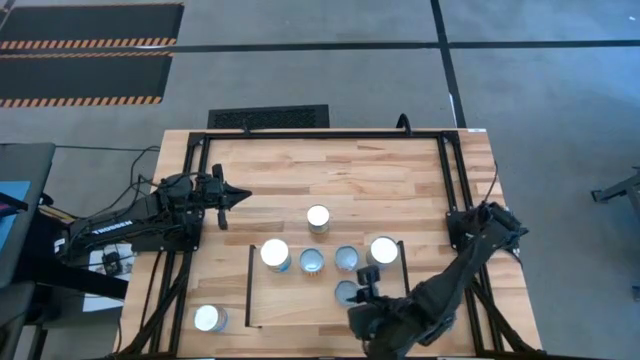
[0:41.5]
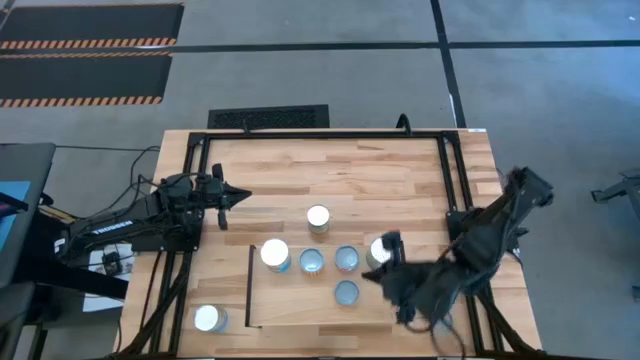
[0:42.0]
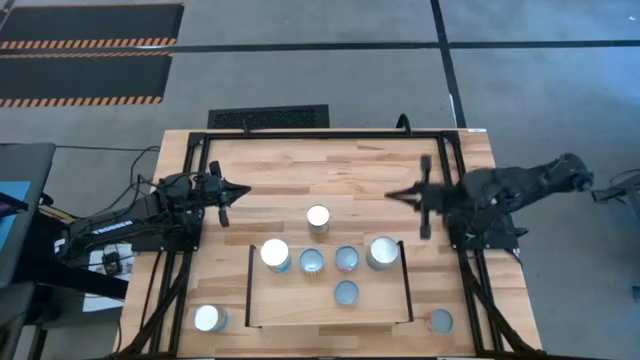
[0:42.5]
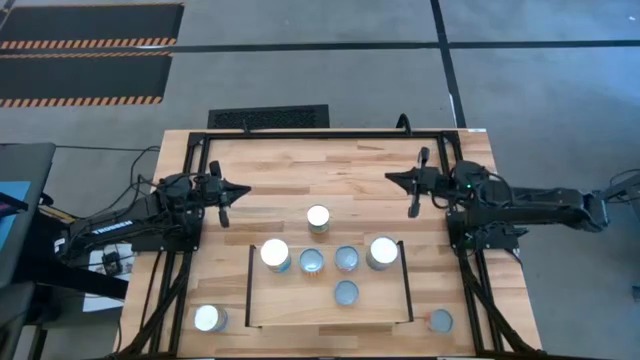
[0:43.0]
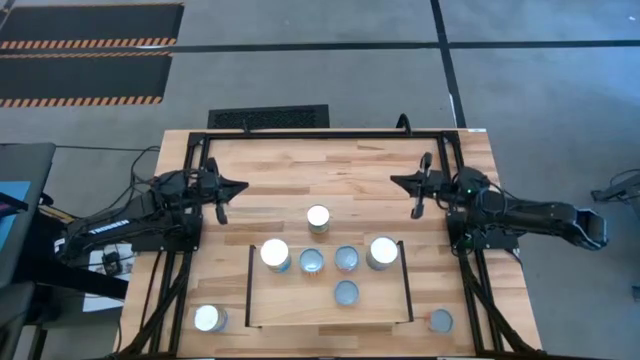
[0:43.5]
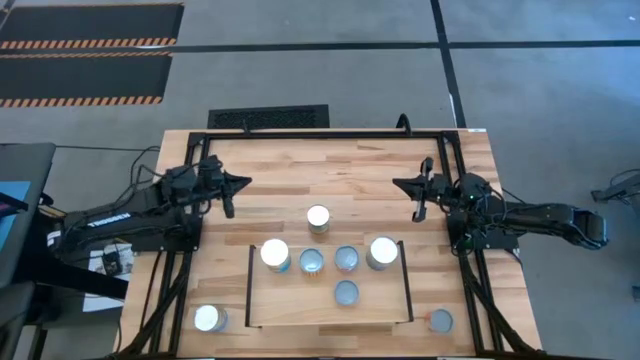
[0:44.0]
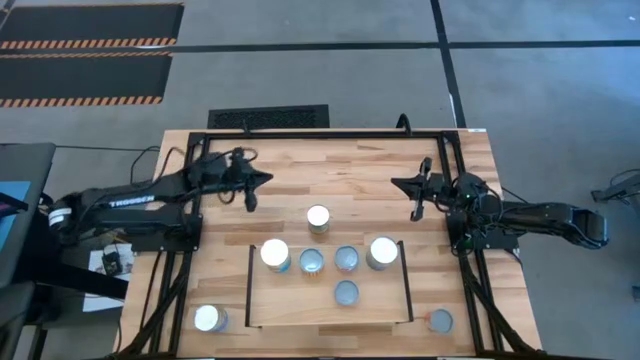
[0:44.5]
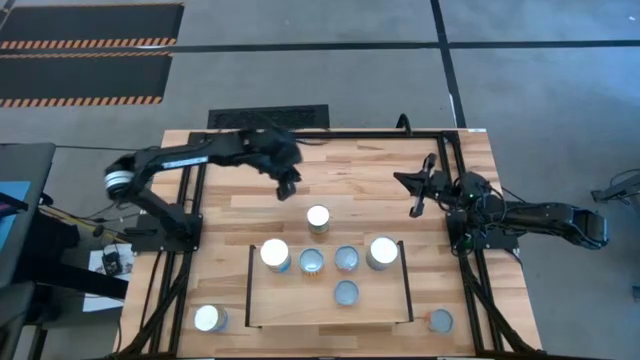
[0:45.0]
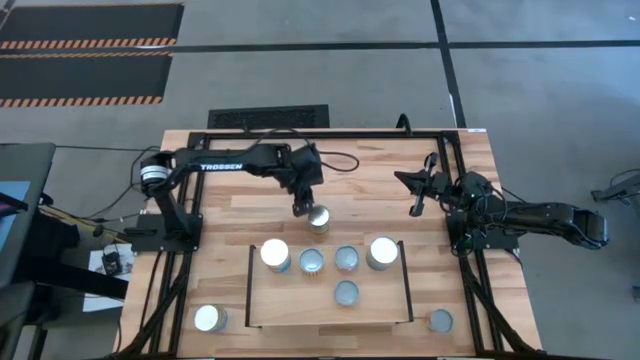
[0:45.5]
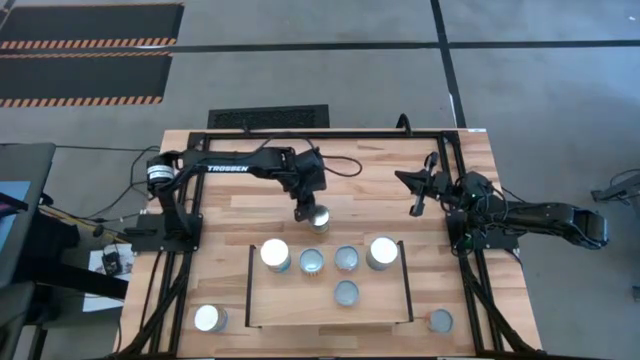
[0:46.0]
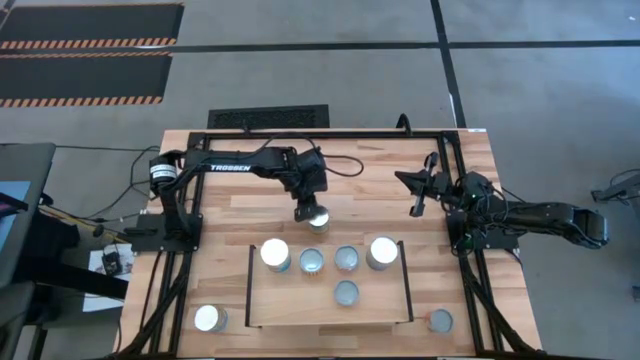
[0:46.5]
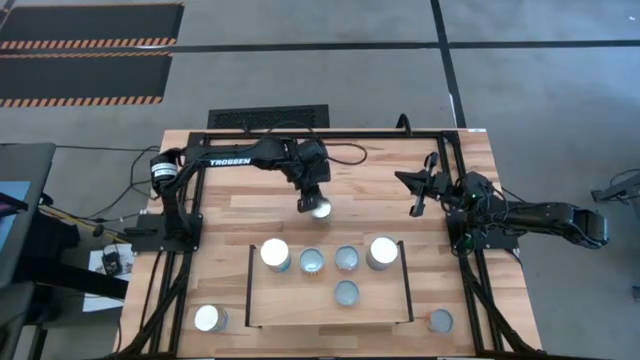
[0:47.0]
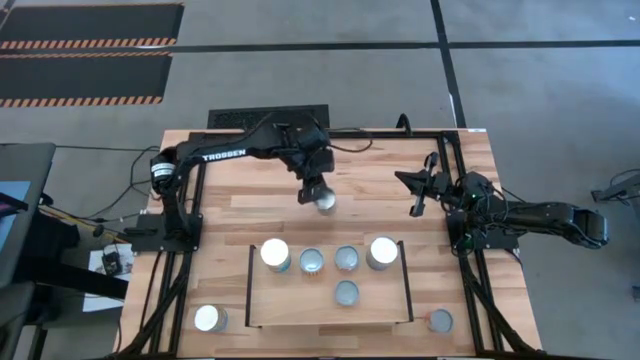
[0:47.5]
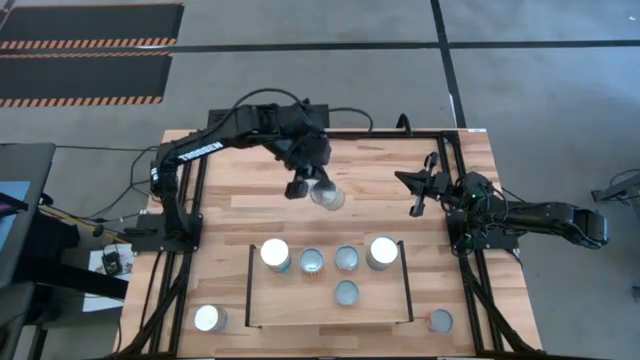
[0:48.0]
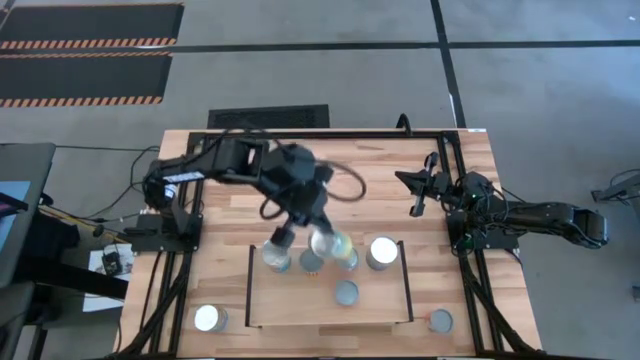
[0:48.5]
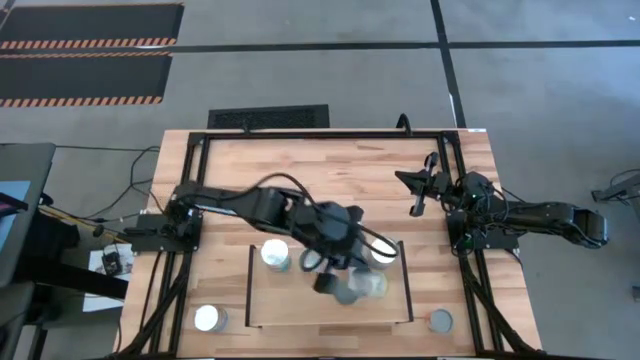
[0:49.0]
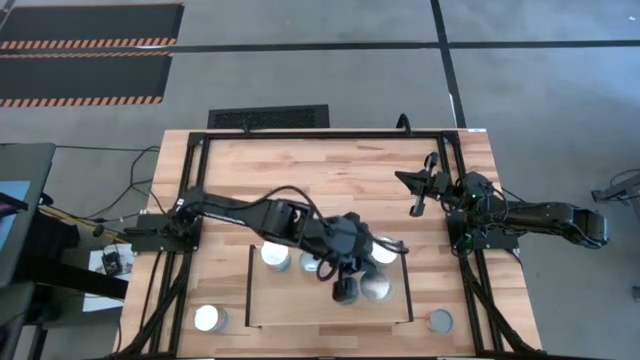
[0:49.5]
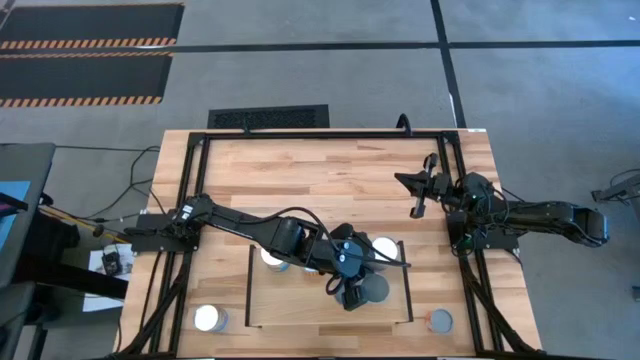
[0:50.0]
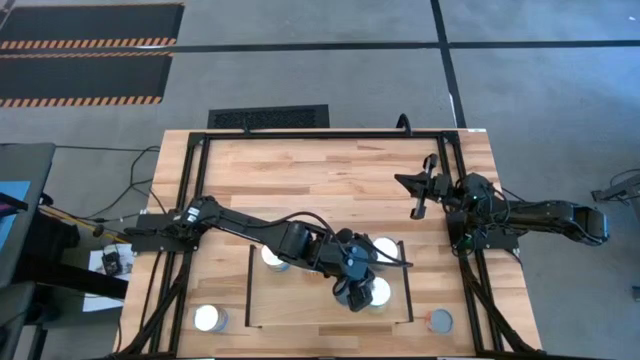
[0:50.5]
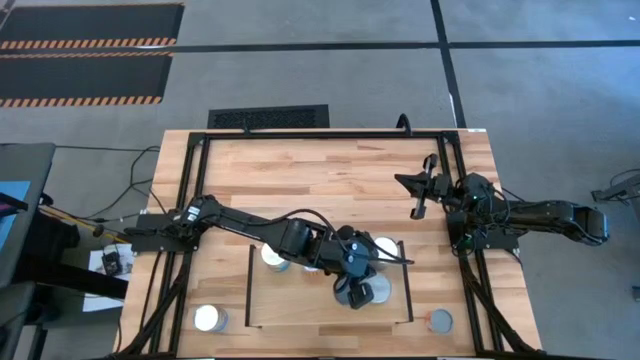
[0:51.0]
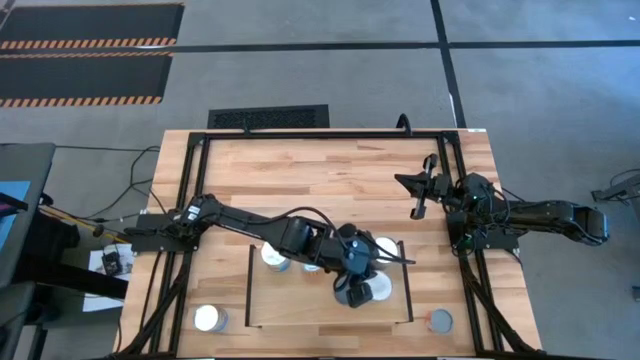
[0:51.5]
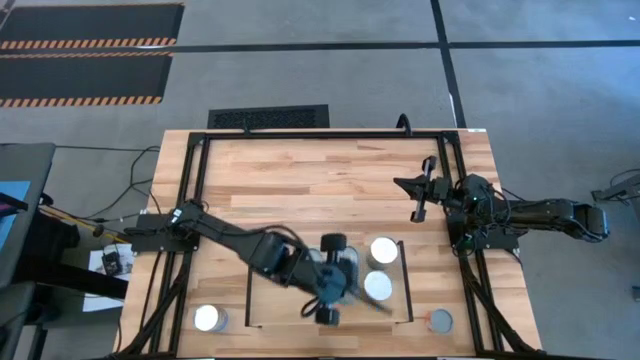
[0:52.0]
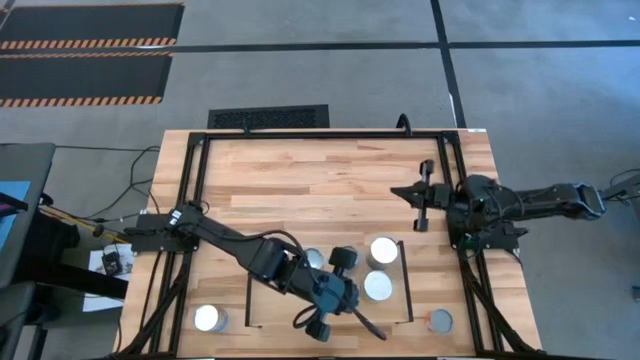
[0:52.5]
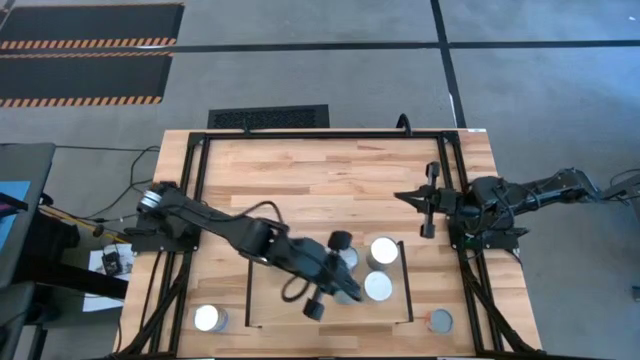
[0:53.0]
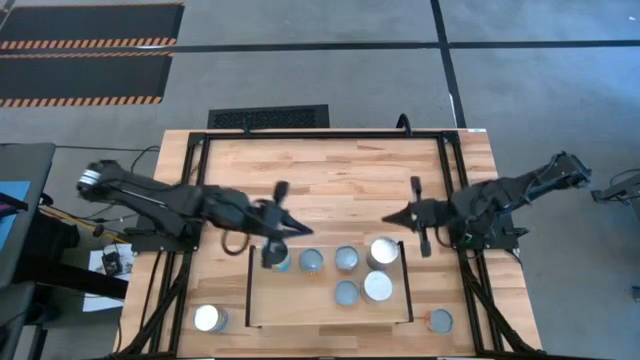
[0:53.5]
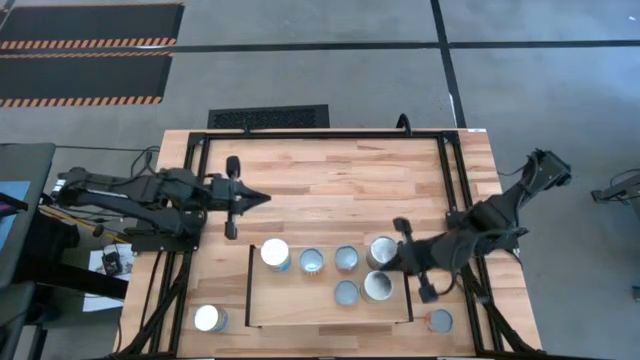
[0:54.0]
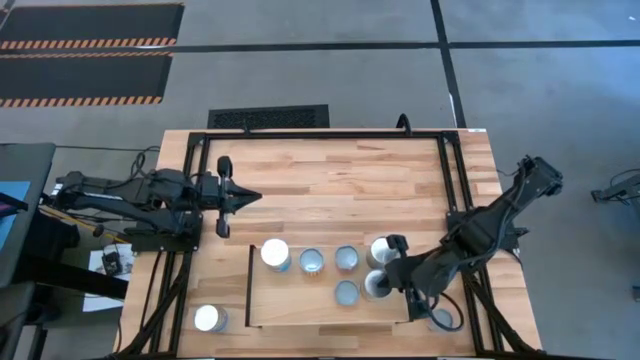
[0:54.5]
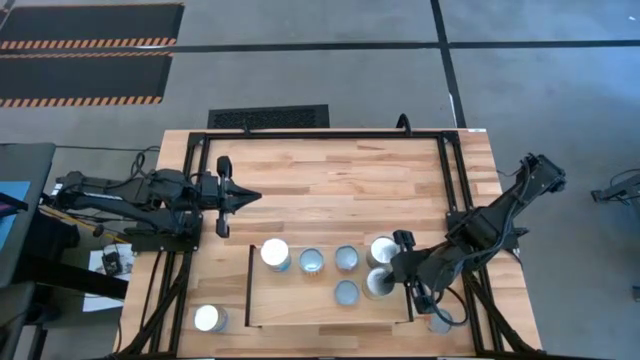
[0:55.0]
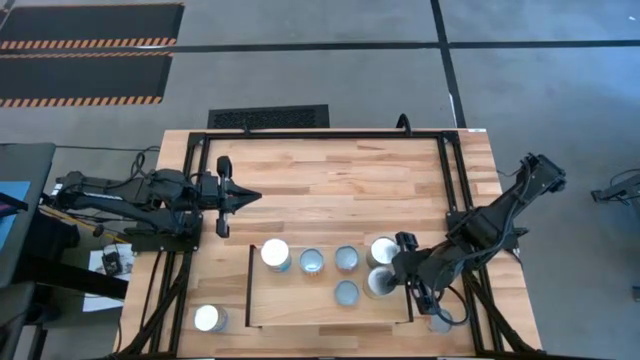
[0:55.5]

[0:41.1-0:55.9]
Task: Pick and place cans onto a shelf
Put the canned carrots on the shelf

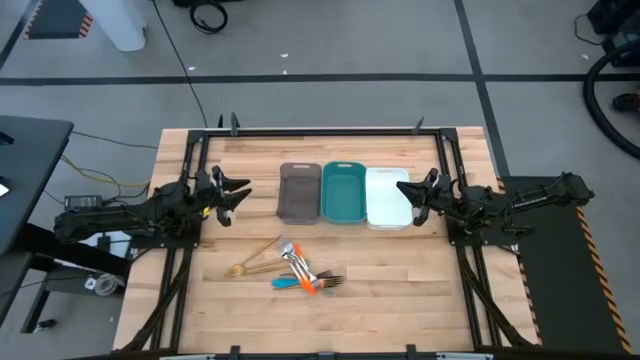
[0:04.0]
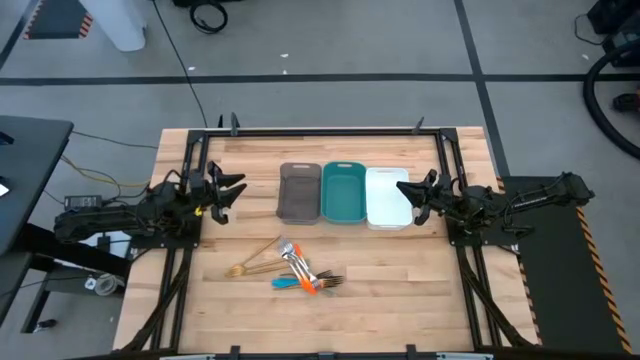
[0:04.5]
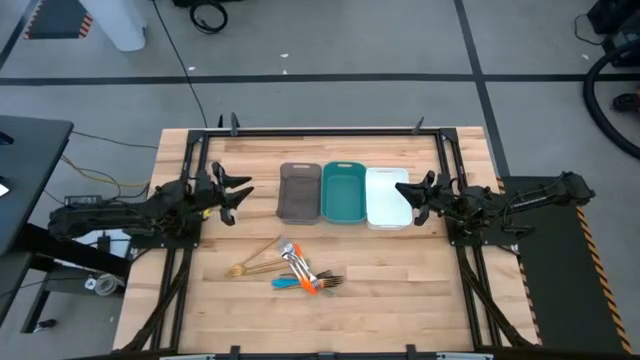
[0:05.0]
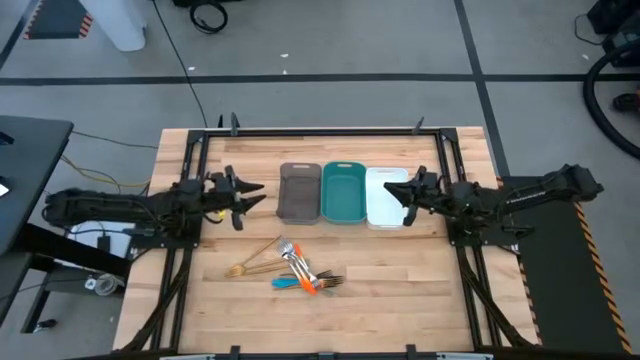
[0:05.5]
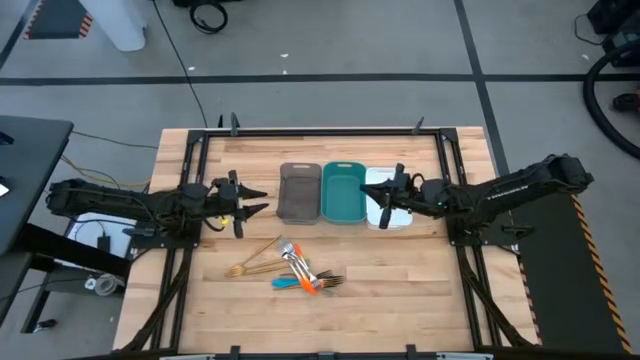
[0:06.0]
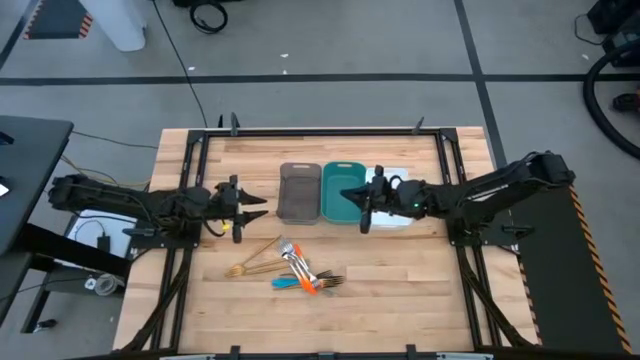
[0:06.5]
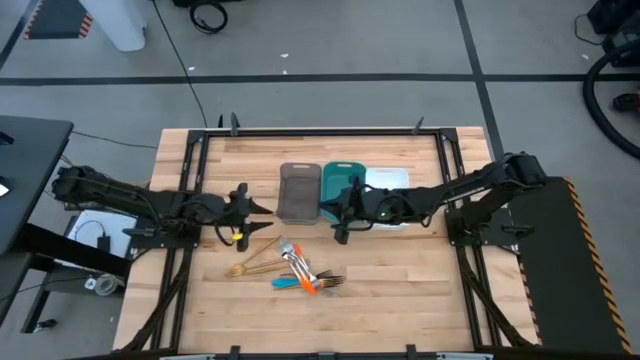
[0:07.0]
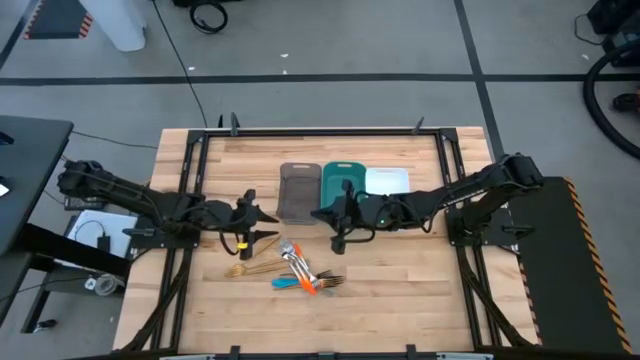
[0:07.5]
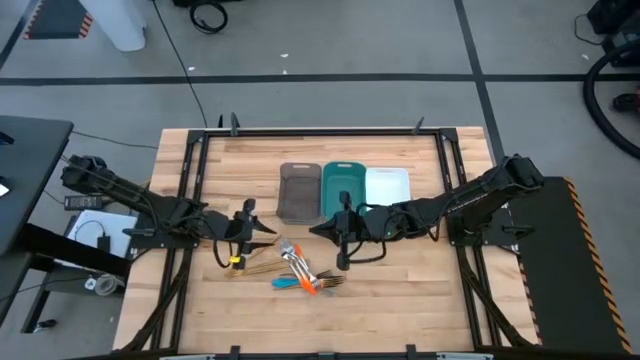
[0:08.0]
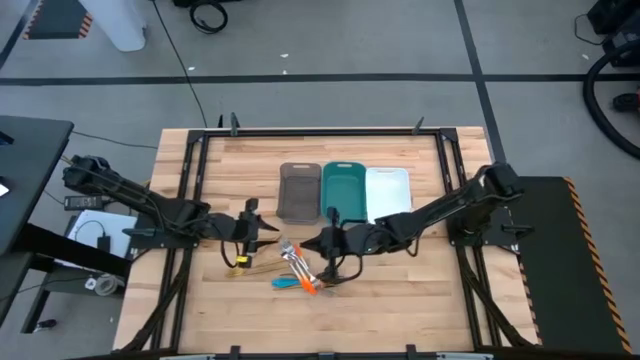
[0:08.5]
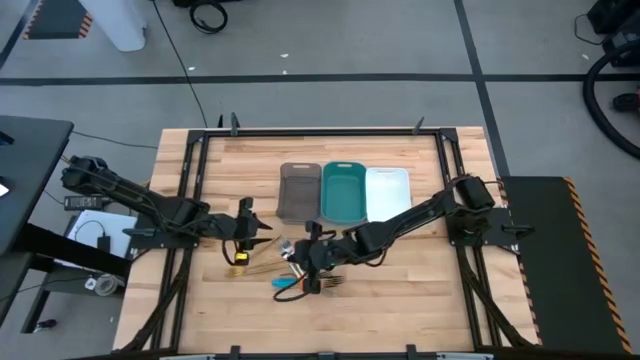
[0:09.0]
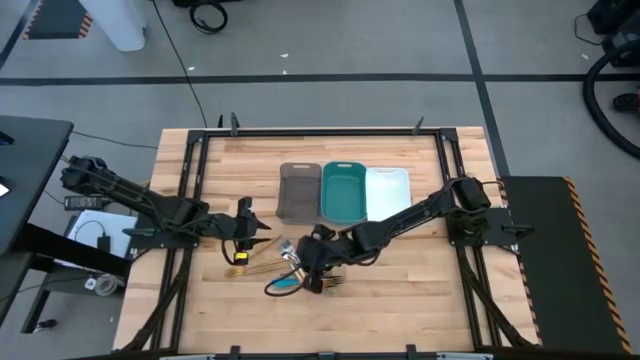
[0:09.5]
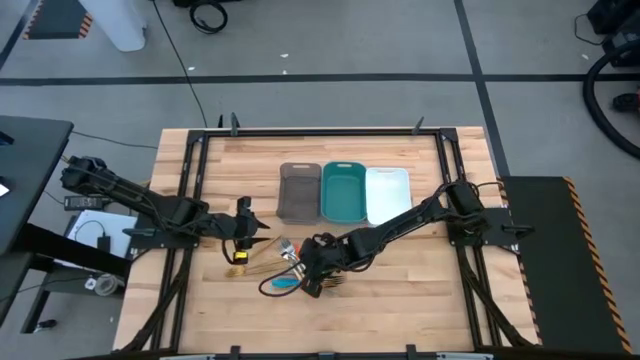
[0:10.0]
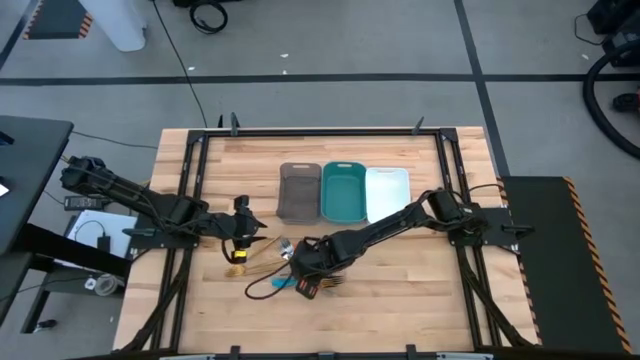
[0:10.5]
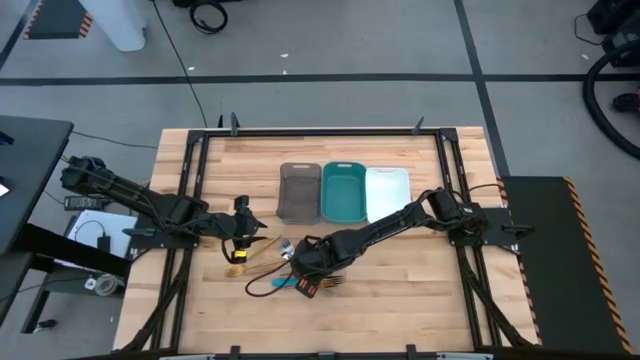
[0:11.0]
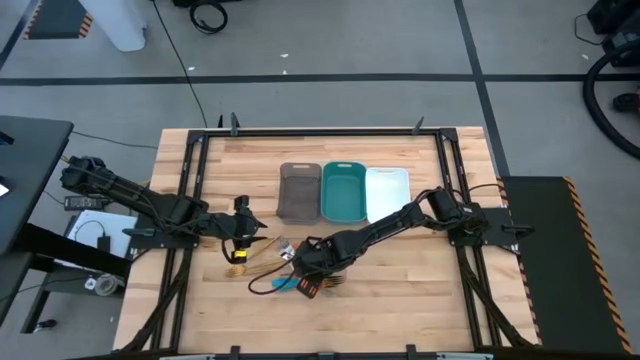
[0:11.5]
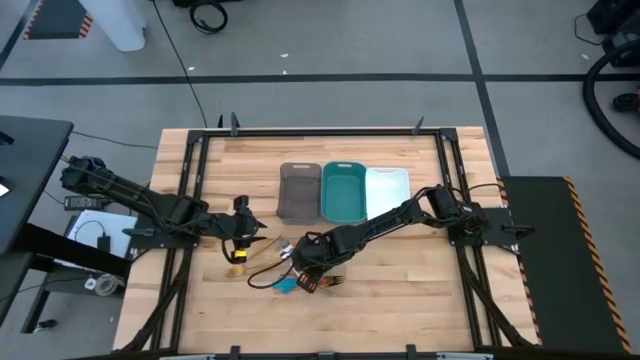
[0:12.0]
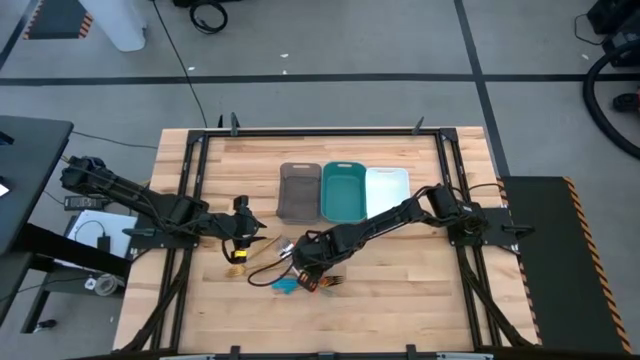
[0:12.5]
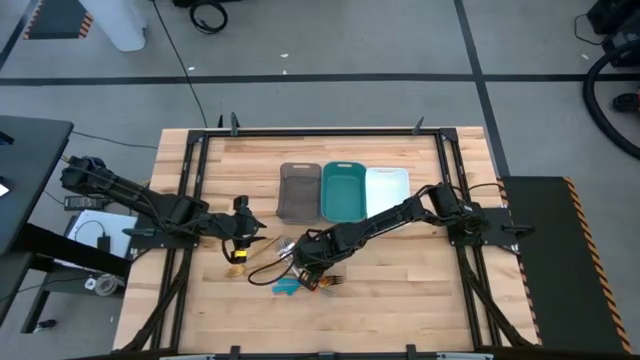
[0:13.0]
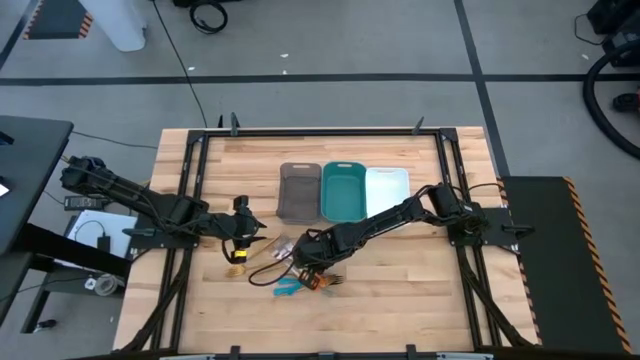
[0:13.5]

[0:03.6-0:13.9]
Task: Sort silverware by color (type)
Put the orange fork into the white bin
